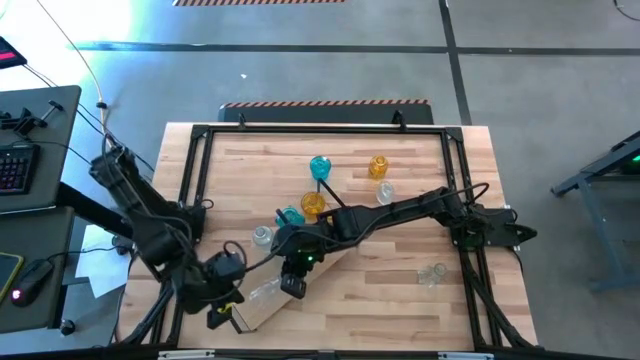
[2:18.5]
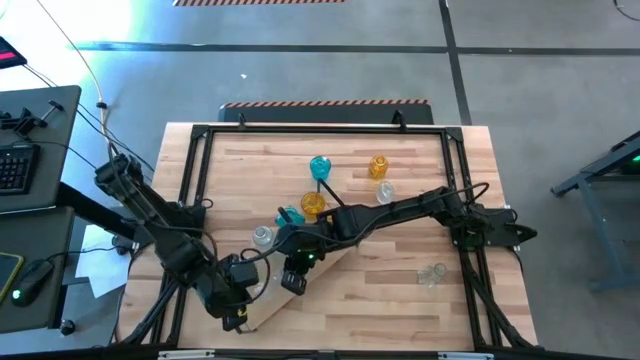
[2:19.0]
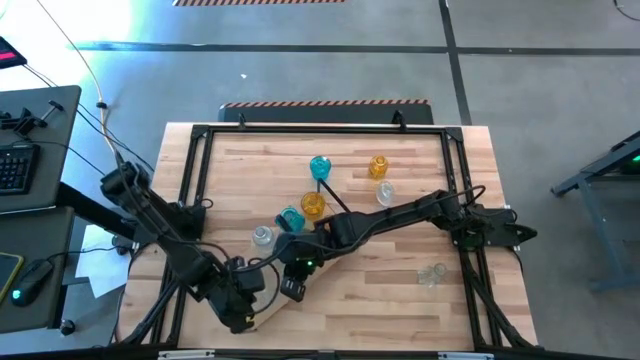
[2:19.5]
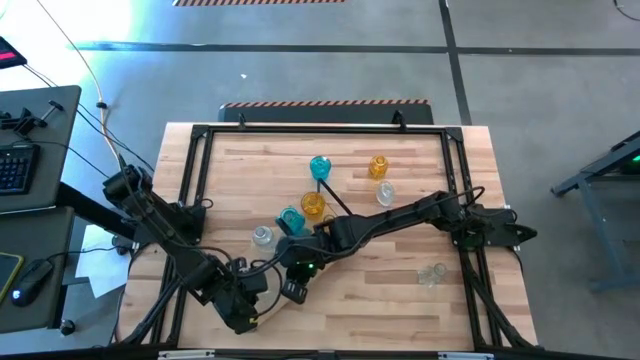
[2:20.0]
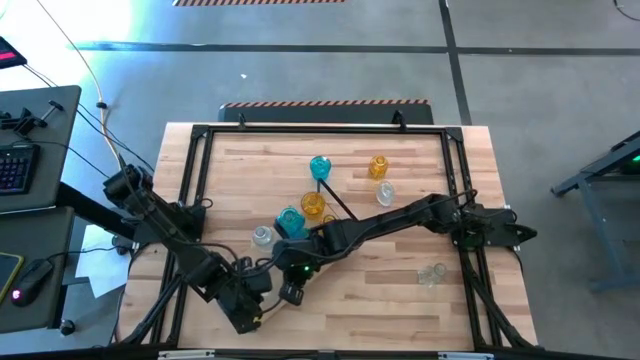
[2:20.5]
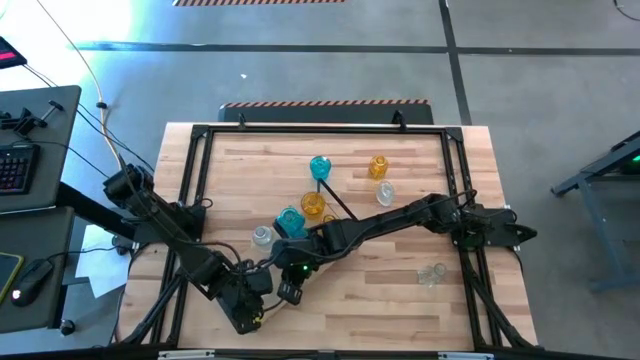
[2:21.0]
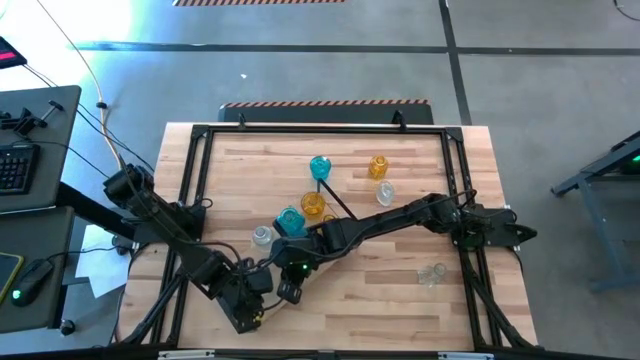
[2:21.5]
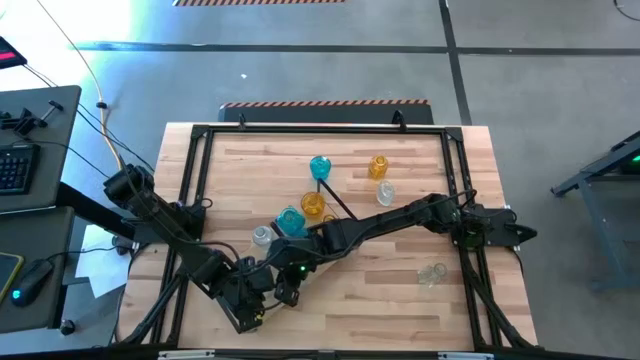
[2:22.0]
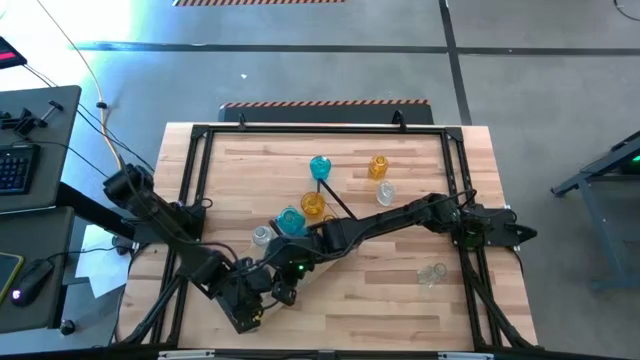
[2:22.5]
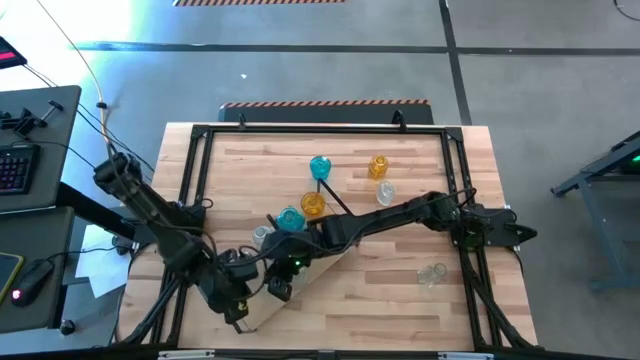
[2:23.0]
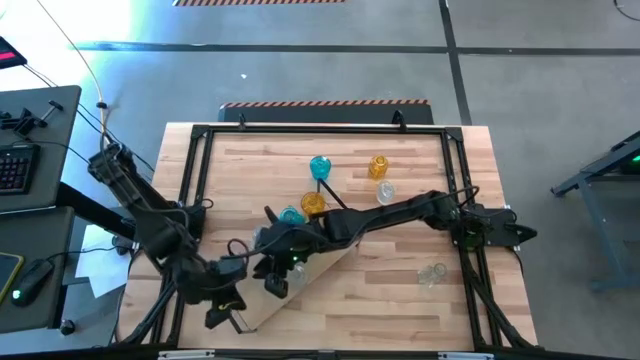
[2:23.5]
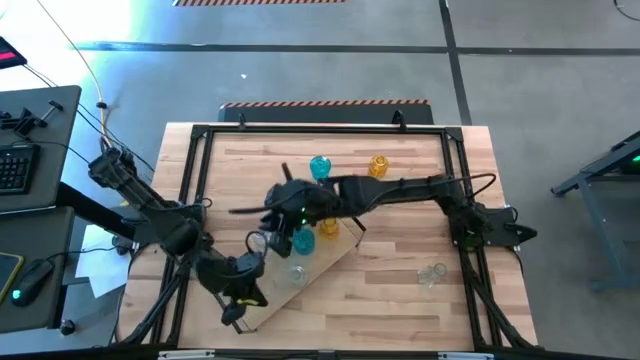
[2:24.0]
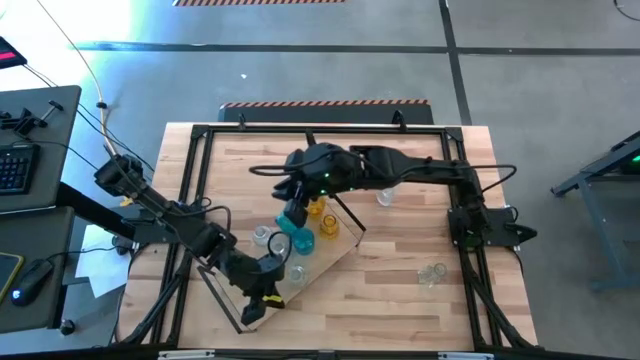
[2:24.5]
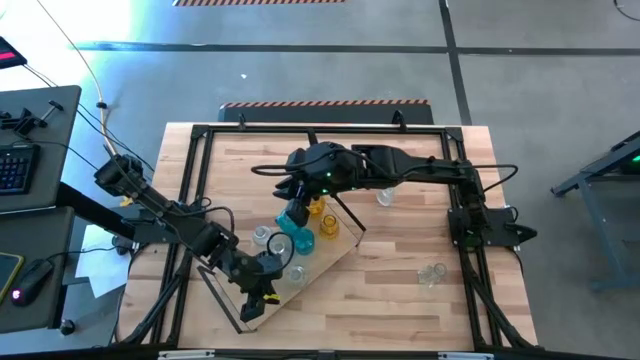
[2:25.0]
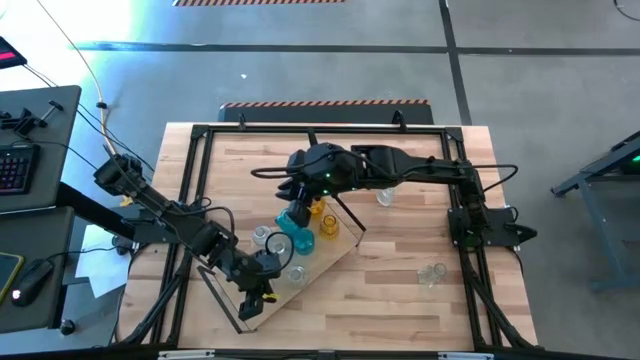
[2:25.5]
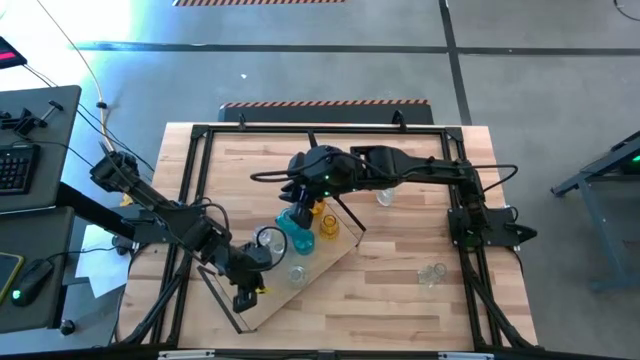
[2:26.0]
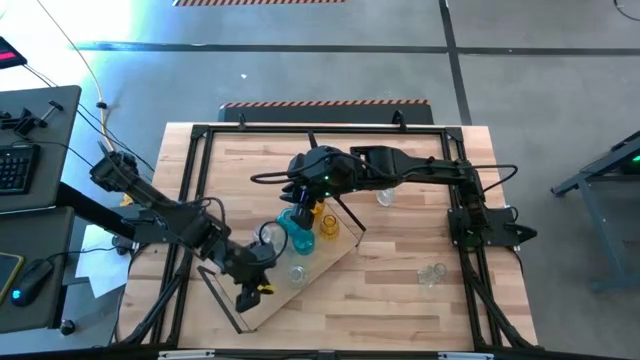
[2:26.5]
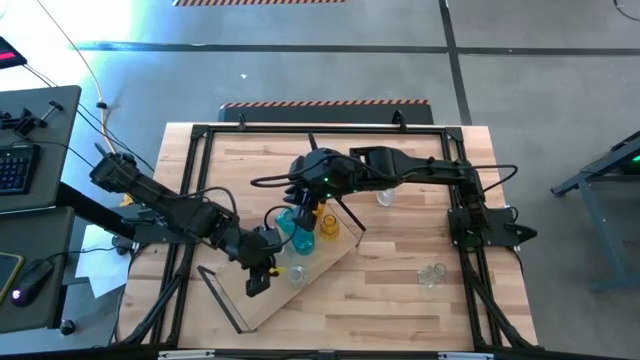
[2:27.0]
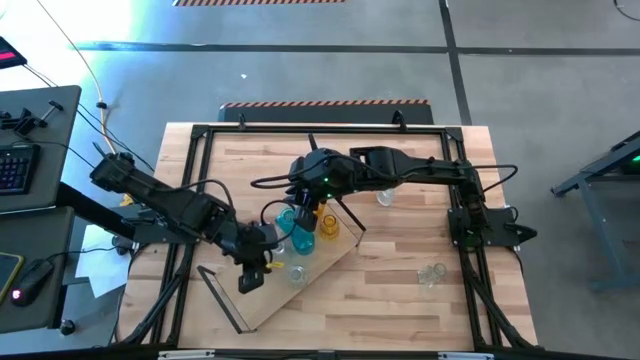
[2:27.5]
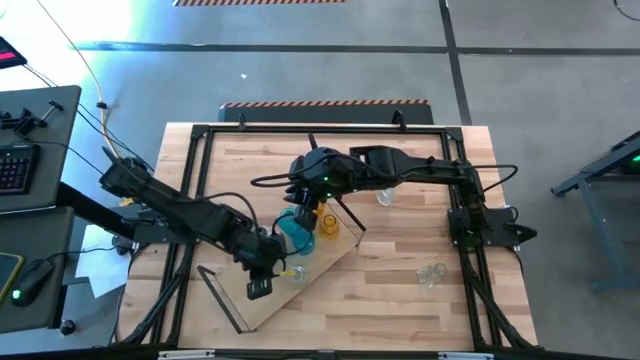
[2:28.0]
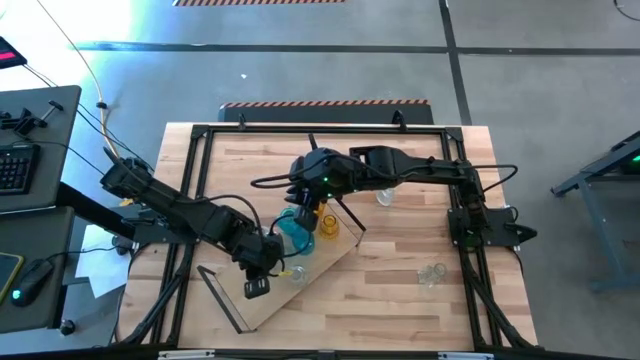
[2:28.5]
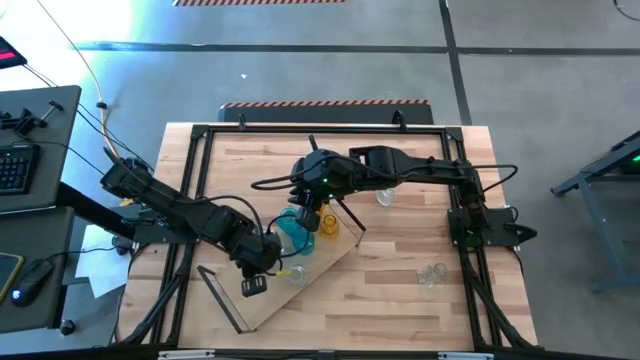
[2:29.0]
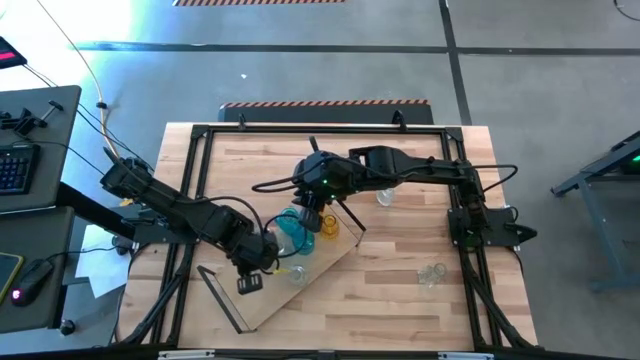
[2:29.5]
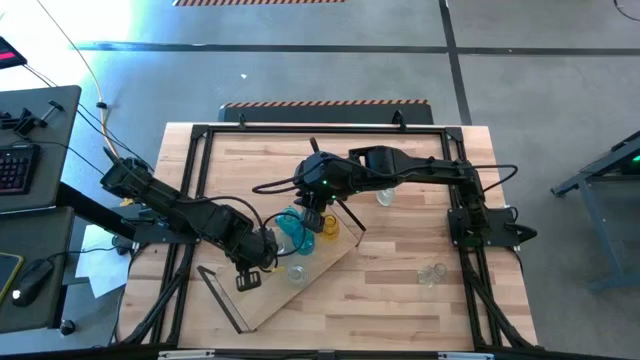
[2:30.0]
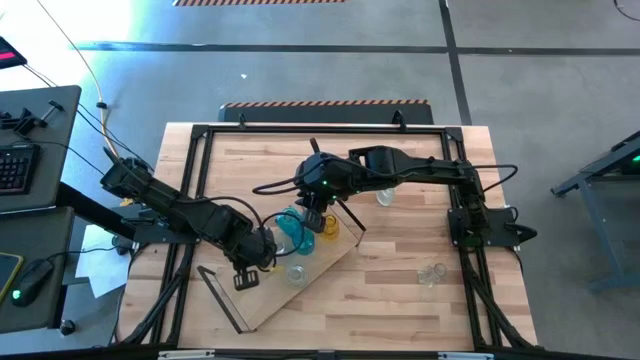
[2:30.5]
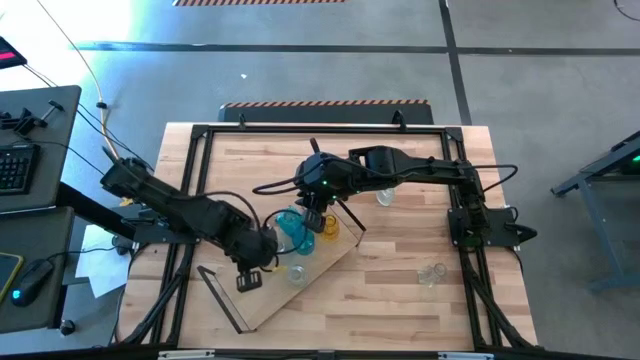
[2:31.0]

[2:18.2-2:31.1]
Task: sort vases onto shelf
Put the transparent vase on the shelf

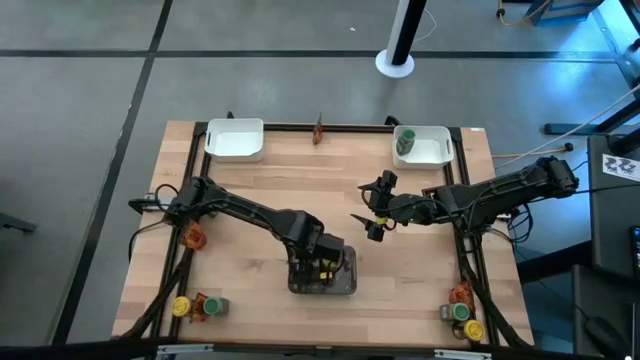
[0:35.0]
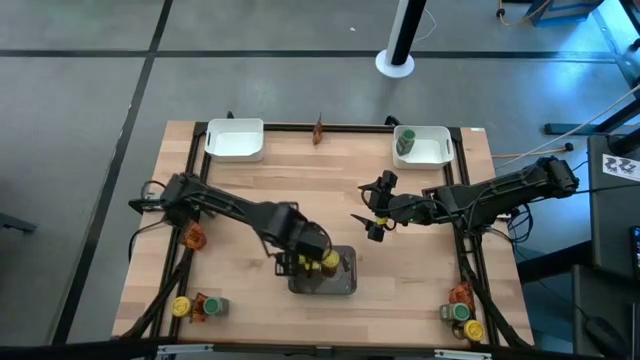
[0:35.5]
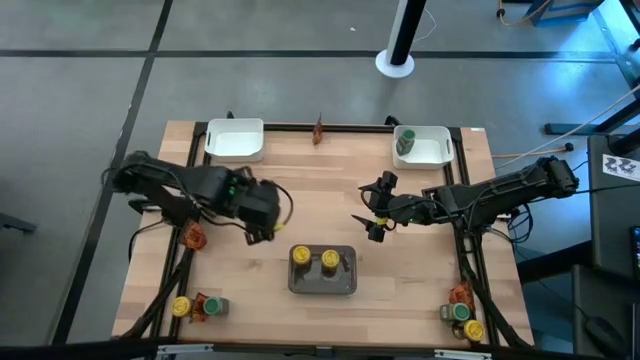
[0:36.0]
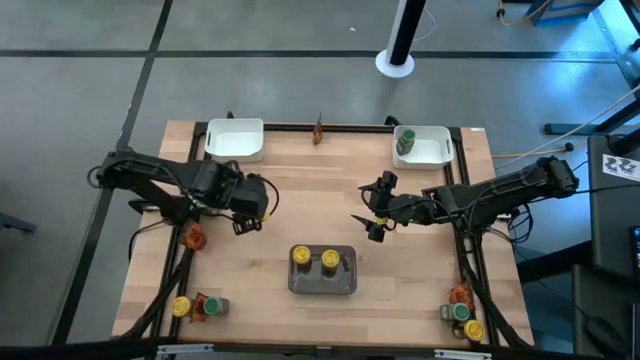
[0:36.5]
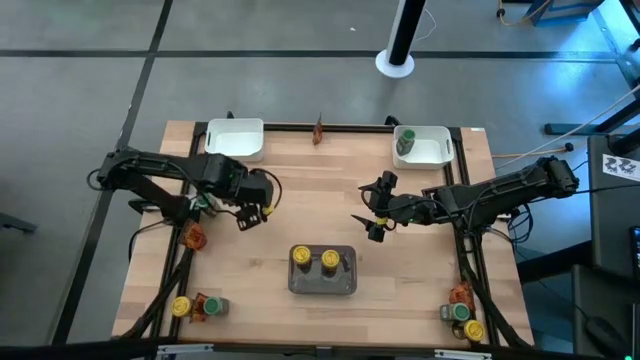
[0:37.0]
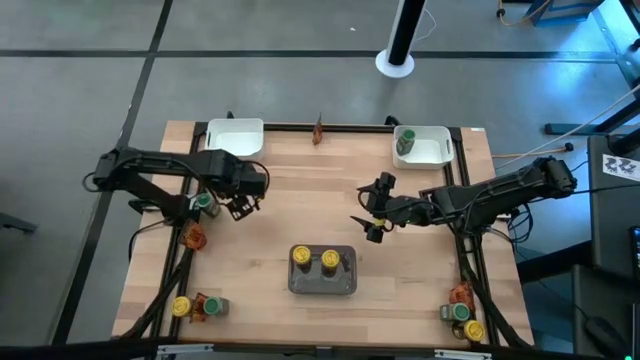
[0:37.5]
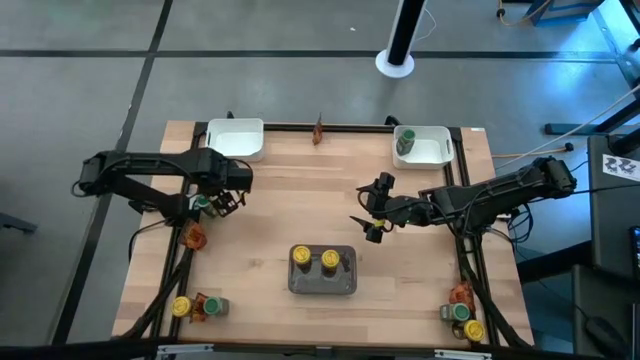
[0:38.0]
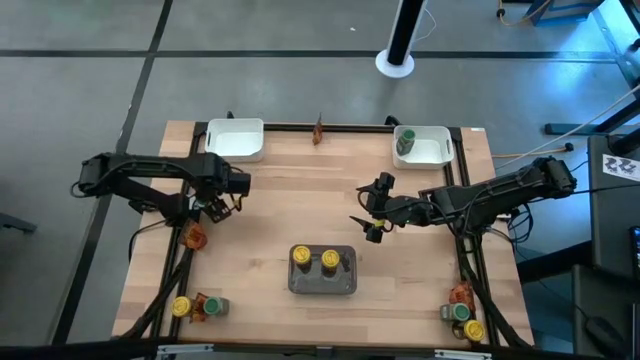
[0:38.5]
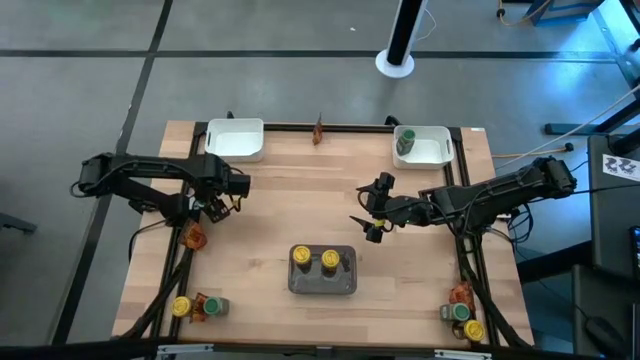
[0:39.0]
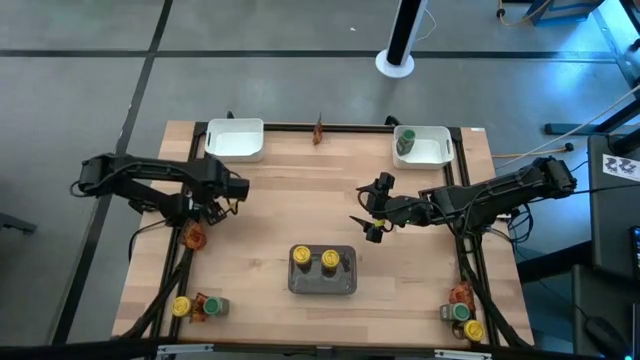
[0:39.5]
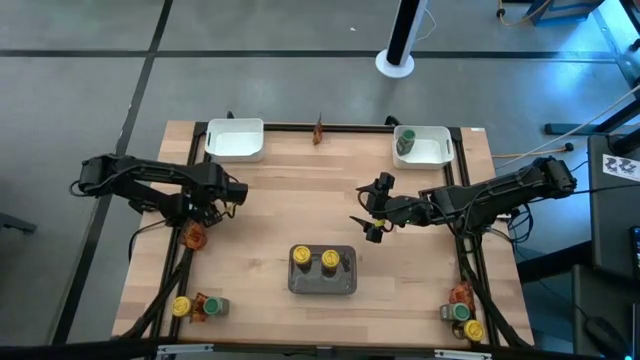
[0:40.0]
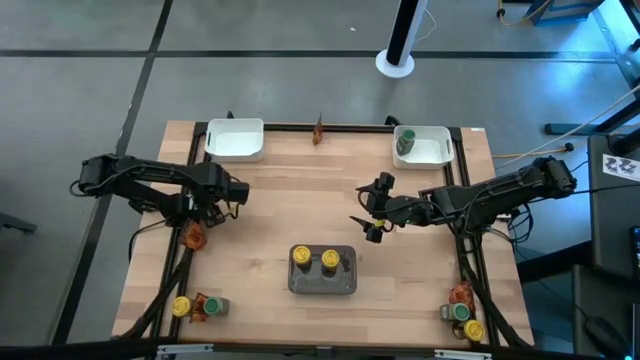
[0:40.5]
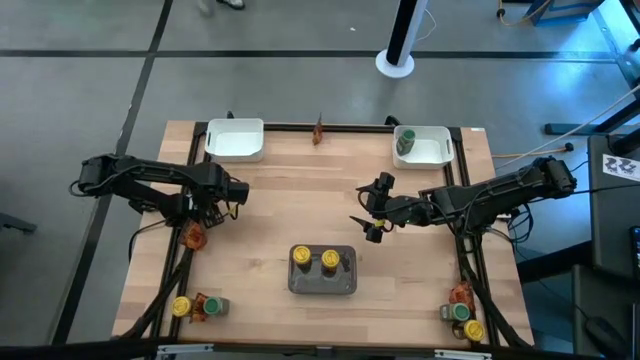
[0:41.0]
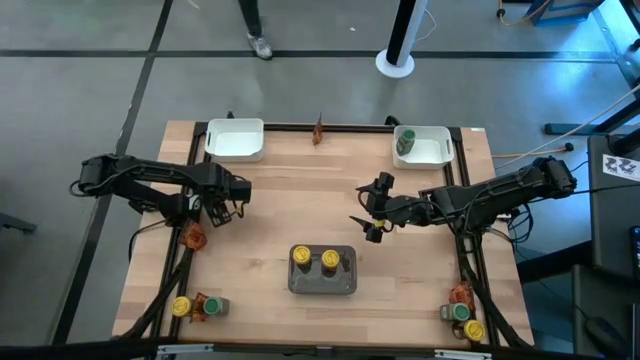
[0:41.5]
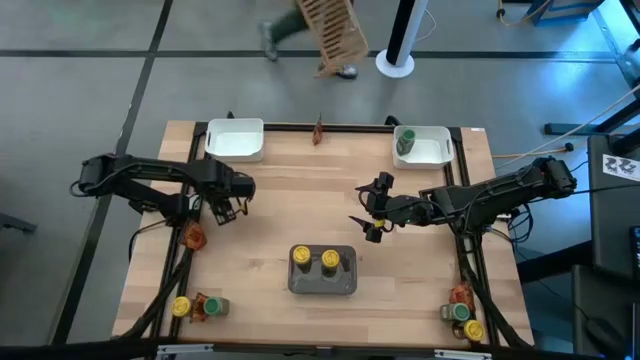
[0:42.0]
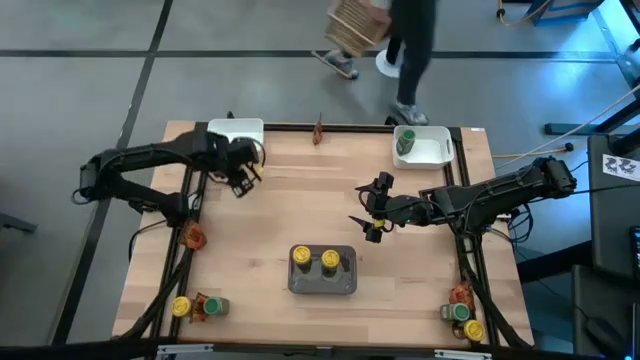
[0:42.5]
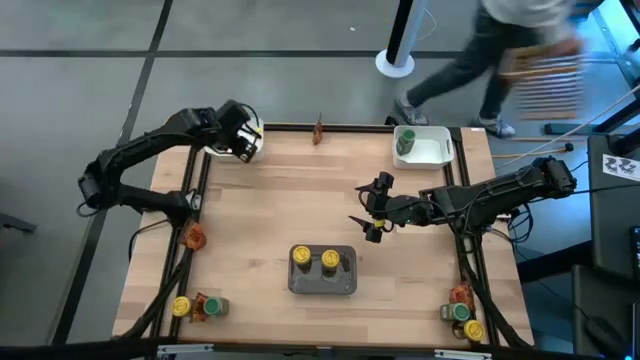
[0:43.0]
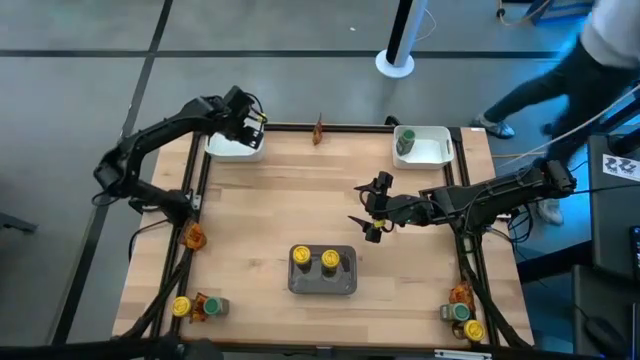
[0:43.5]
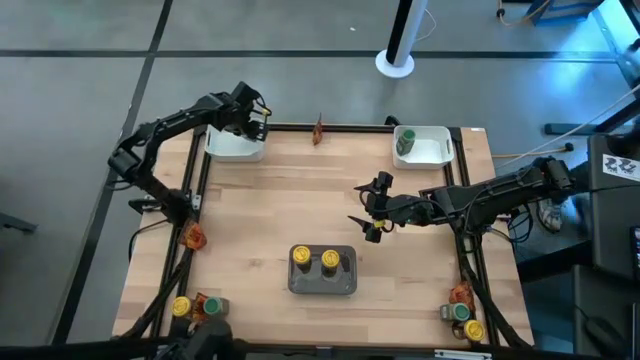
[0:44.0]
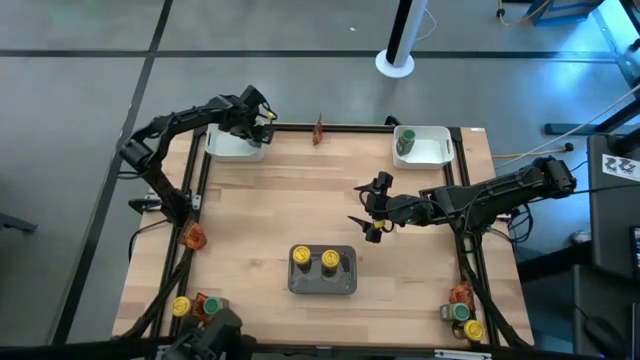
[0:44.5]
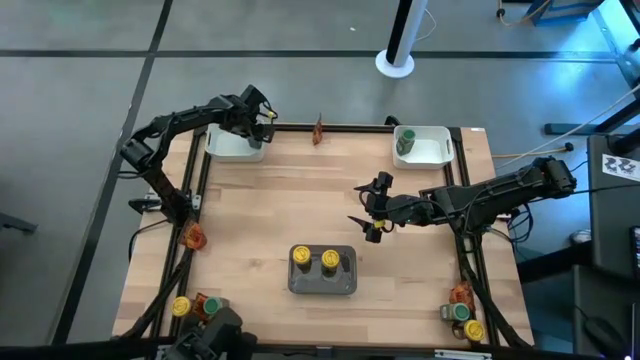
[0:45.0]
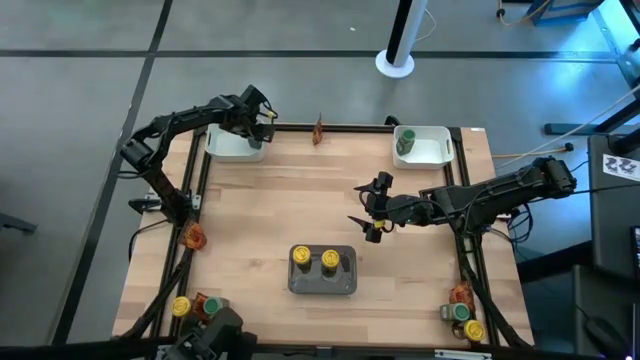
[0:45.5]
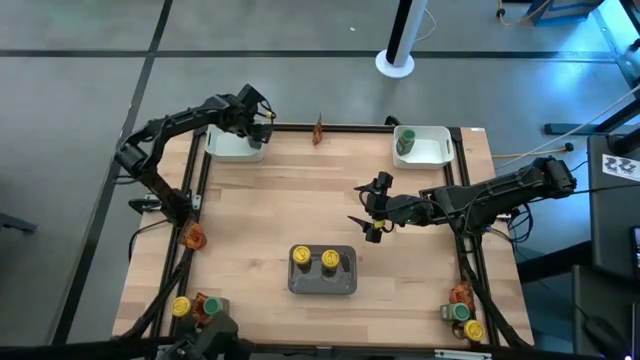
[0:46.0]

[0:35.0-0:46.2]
Task: Sort spices by type
Put the top left green seasoning bottle into the left white bin
